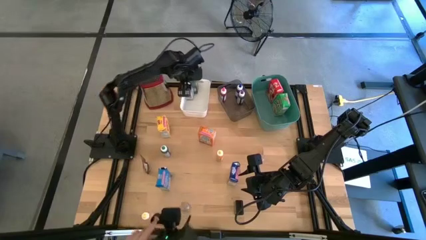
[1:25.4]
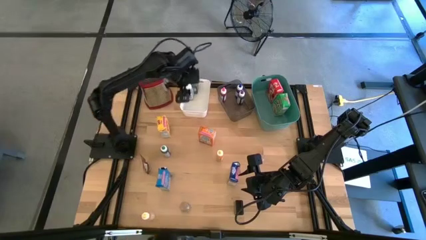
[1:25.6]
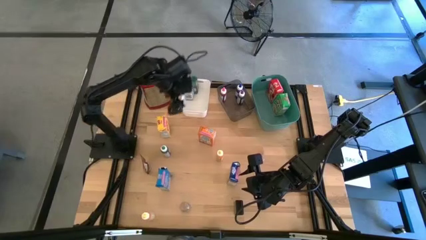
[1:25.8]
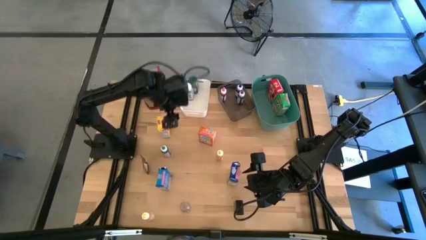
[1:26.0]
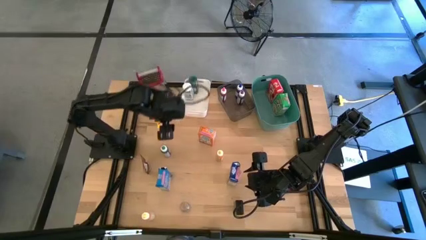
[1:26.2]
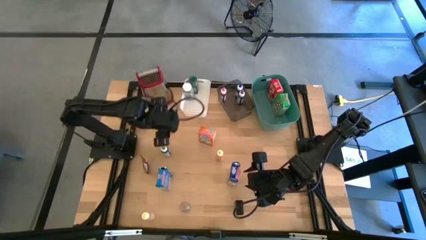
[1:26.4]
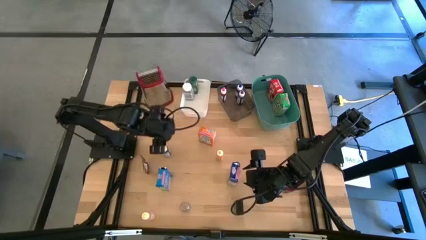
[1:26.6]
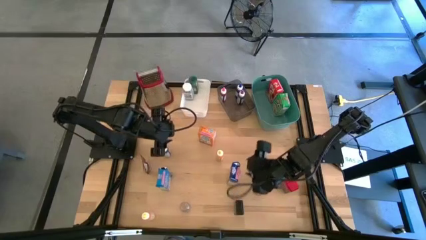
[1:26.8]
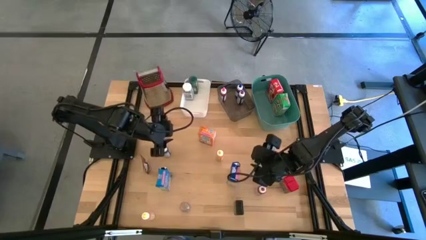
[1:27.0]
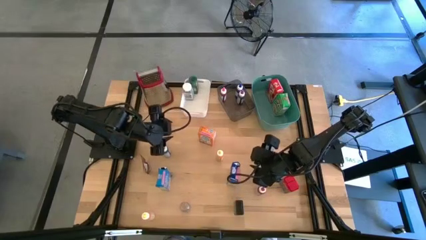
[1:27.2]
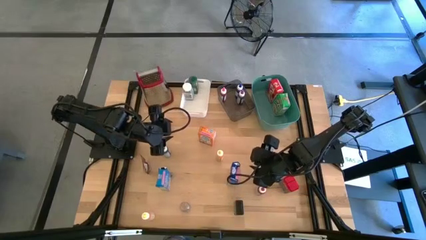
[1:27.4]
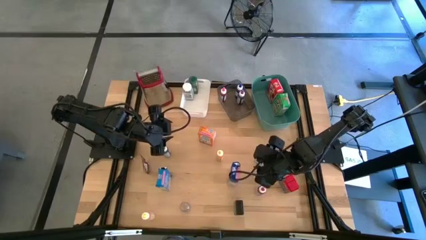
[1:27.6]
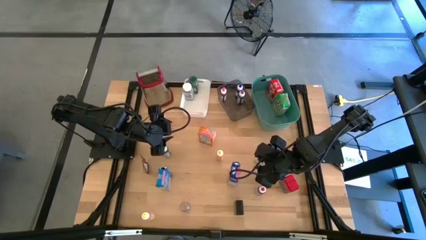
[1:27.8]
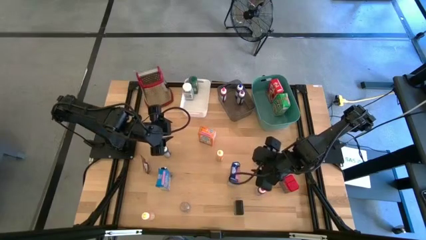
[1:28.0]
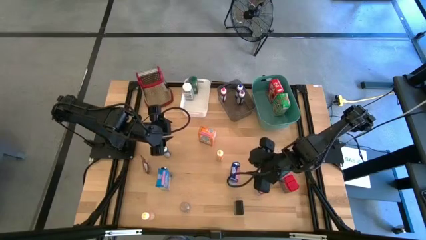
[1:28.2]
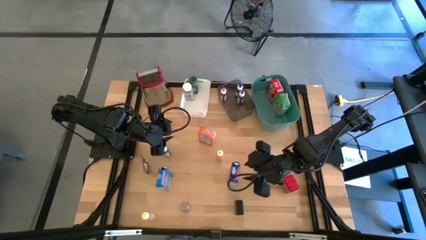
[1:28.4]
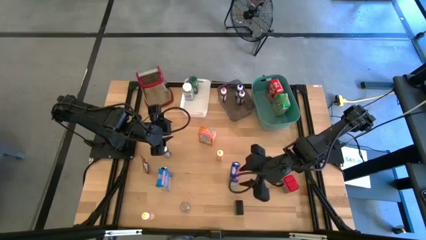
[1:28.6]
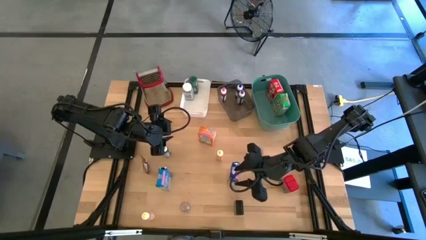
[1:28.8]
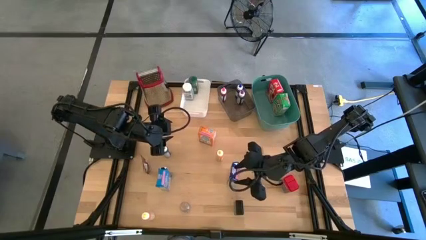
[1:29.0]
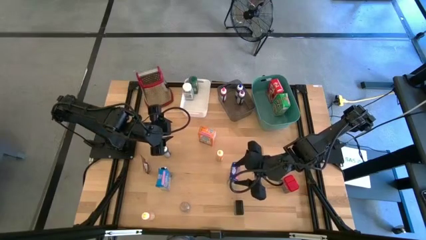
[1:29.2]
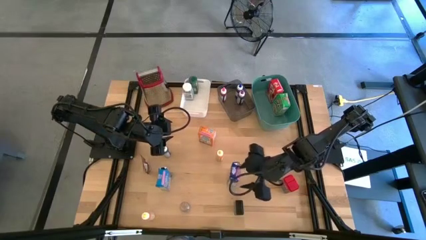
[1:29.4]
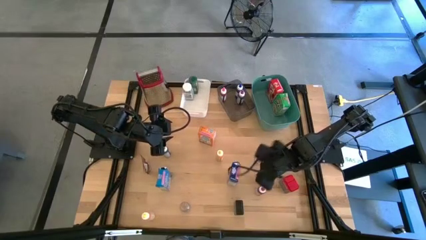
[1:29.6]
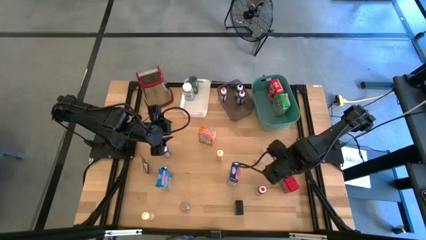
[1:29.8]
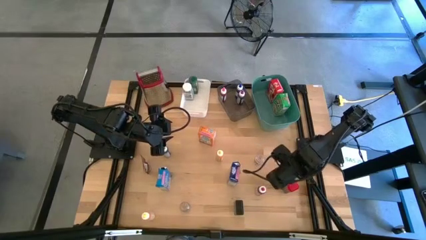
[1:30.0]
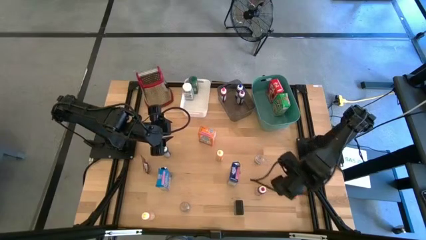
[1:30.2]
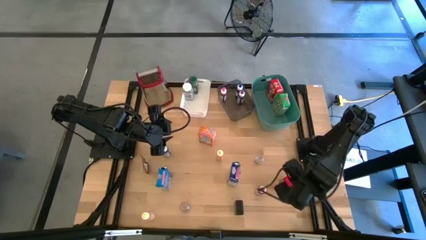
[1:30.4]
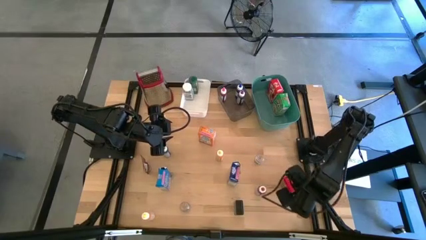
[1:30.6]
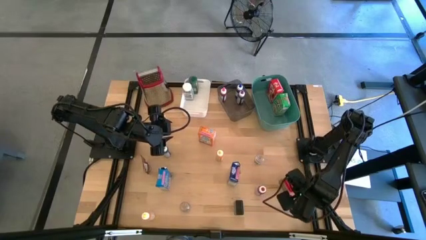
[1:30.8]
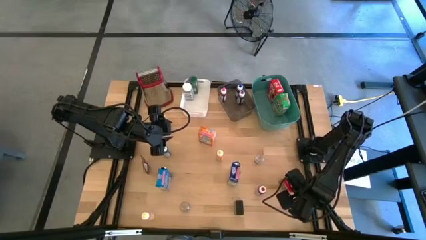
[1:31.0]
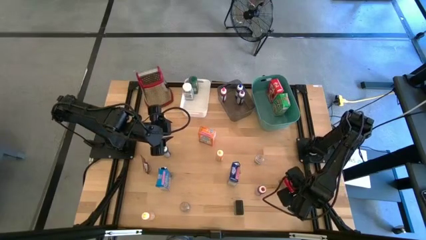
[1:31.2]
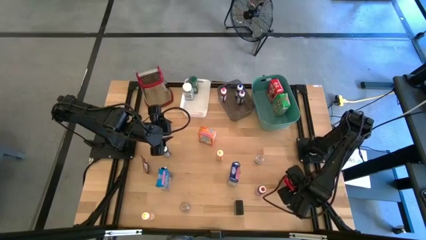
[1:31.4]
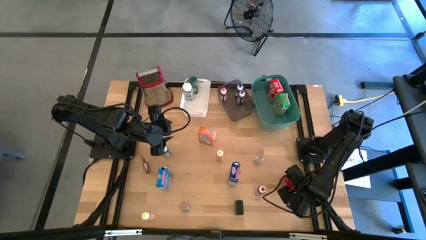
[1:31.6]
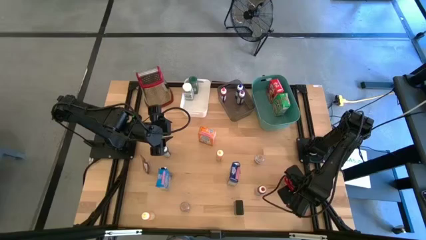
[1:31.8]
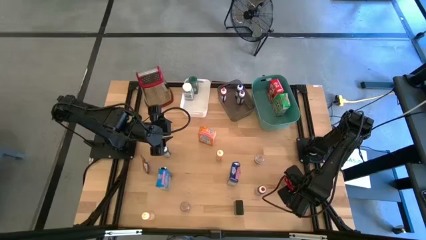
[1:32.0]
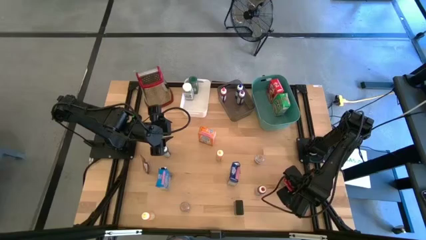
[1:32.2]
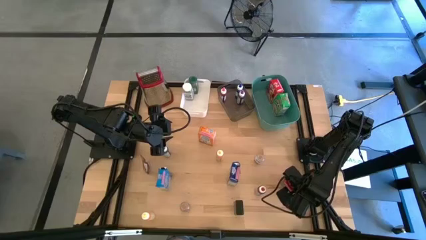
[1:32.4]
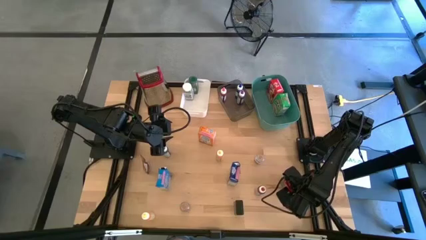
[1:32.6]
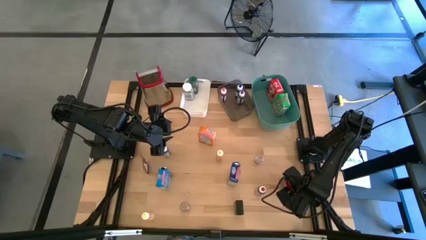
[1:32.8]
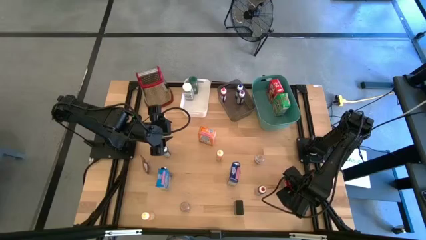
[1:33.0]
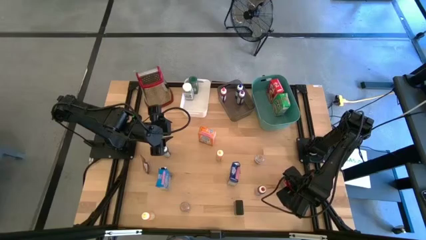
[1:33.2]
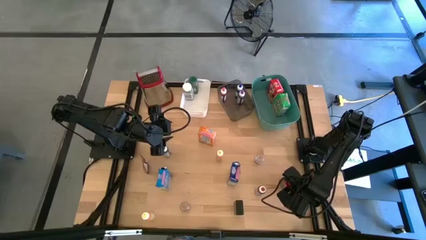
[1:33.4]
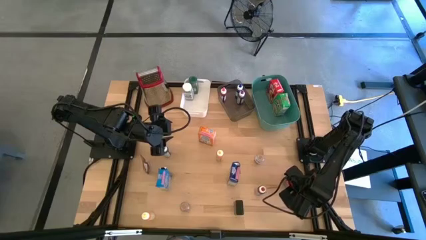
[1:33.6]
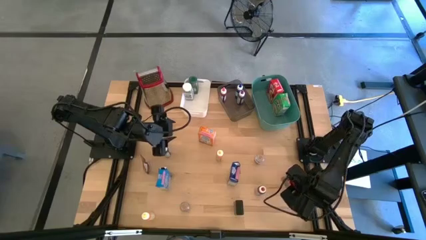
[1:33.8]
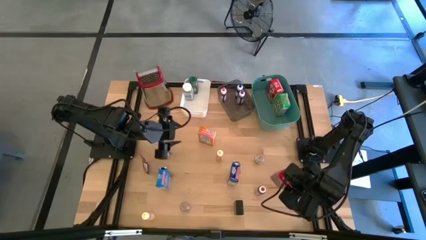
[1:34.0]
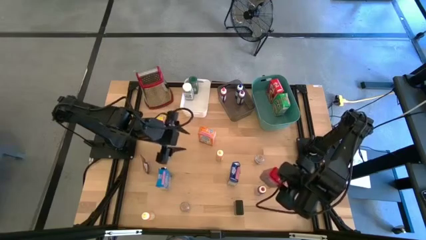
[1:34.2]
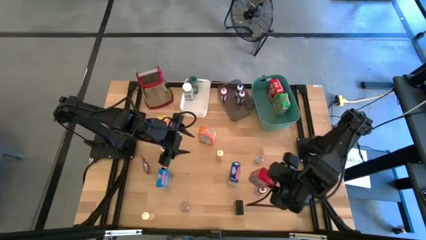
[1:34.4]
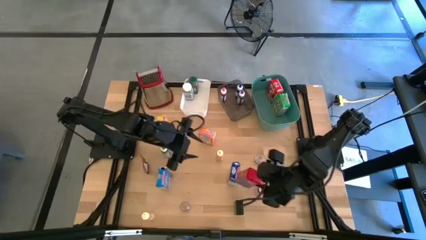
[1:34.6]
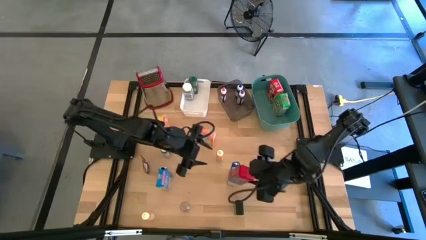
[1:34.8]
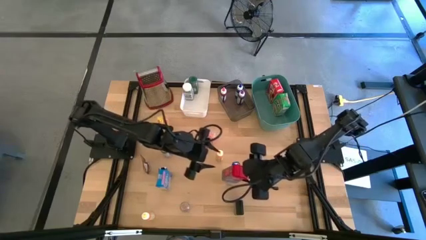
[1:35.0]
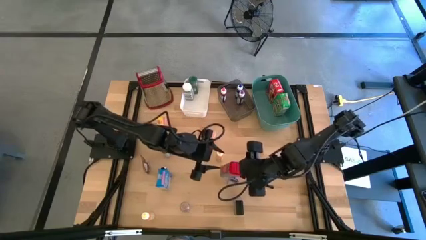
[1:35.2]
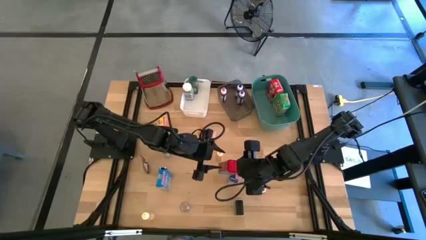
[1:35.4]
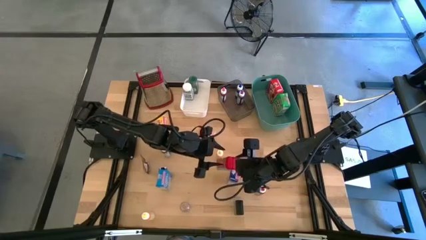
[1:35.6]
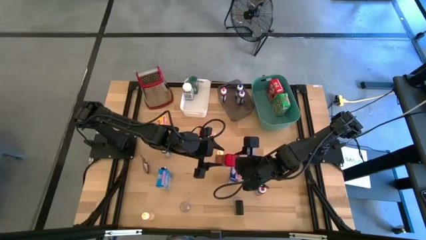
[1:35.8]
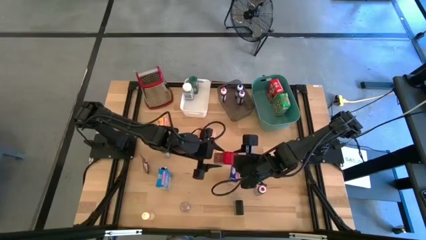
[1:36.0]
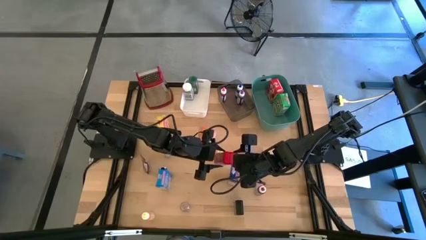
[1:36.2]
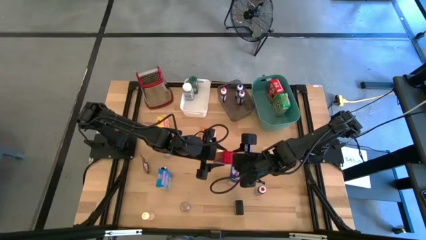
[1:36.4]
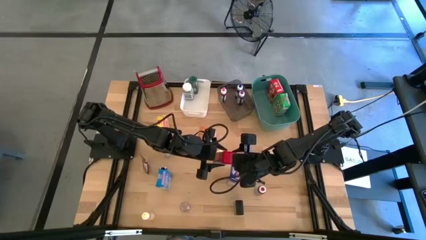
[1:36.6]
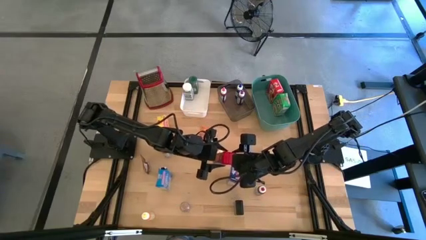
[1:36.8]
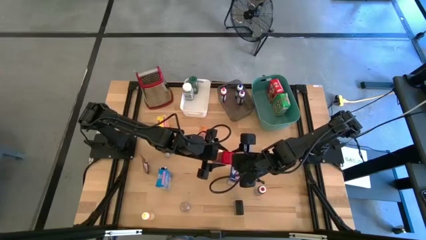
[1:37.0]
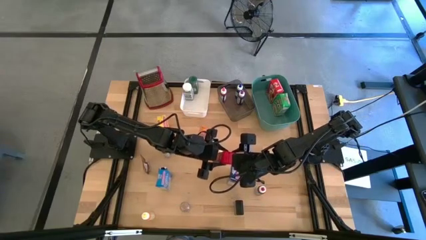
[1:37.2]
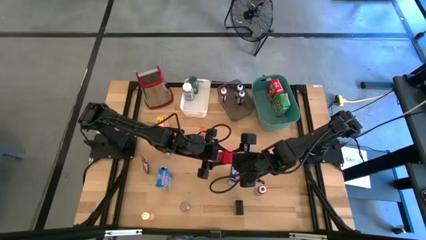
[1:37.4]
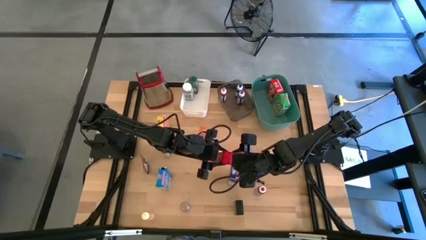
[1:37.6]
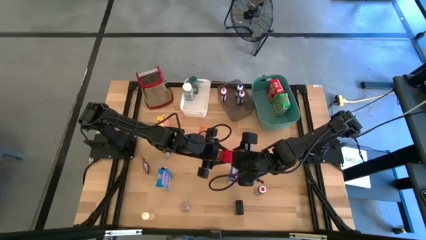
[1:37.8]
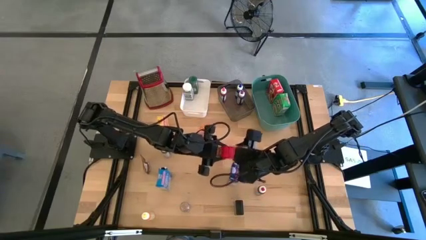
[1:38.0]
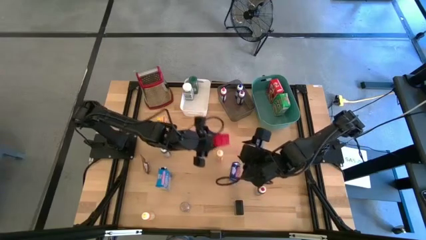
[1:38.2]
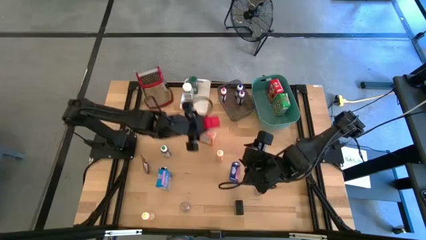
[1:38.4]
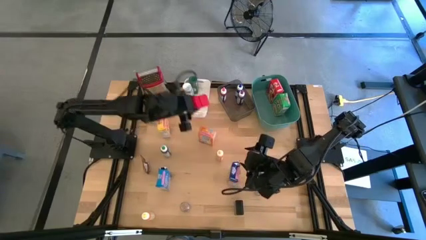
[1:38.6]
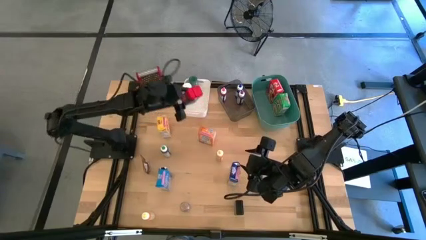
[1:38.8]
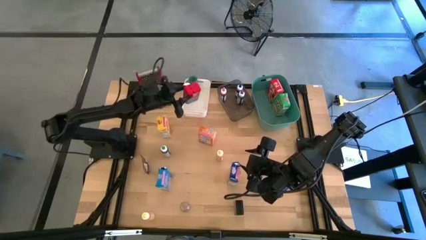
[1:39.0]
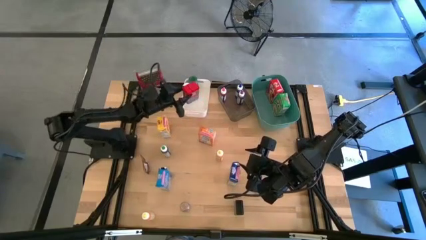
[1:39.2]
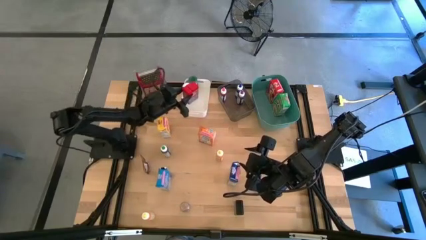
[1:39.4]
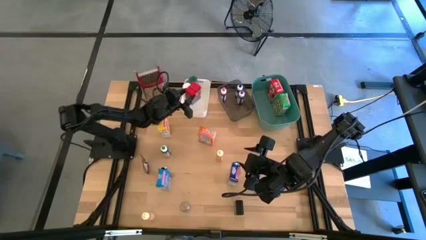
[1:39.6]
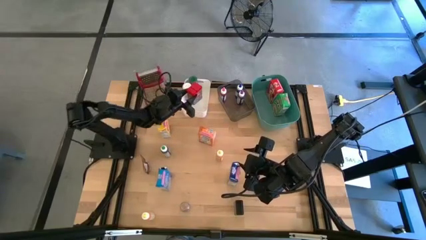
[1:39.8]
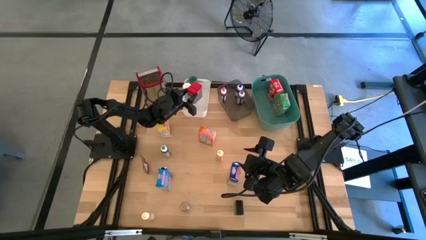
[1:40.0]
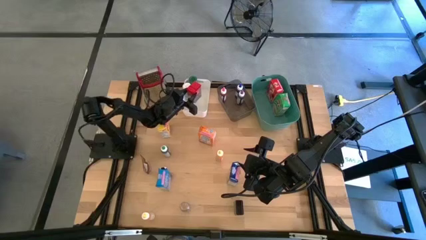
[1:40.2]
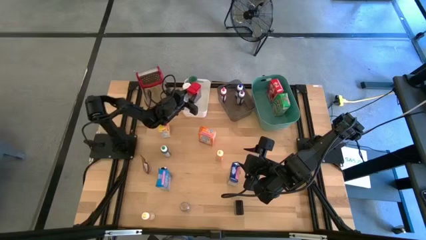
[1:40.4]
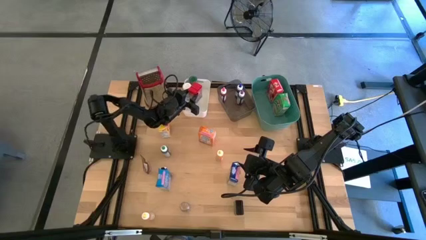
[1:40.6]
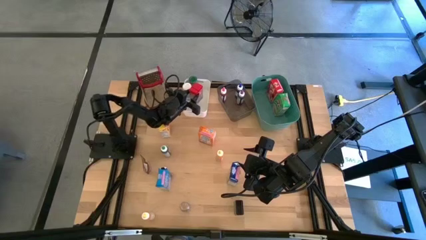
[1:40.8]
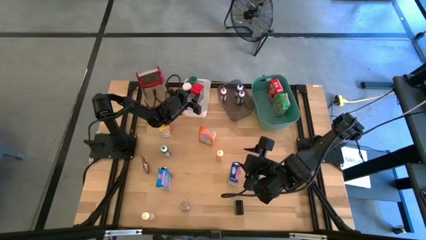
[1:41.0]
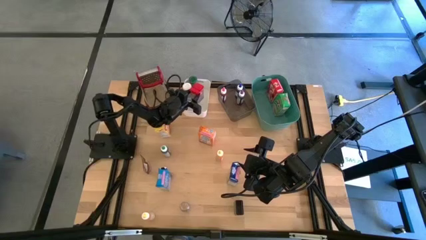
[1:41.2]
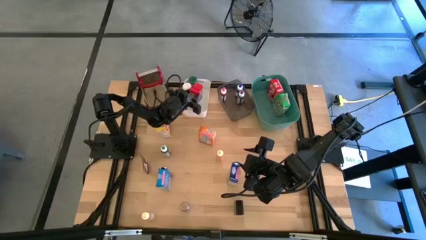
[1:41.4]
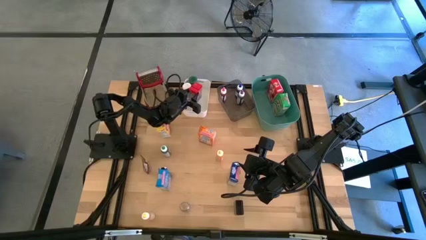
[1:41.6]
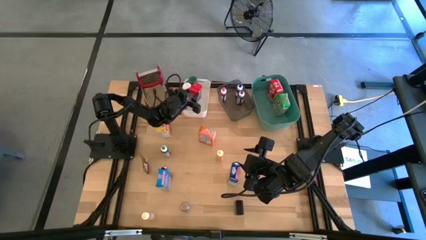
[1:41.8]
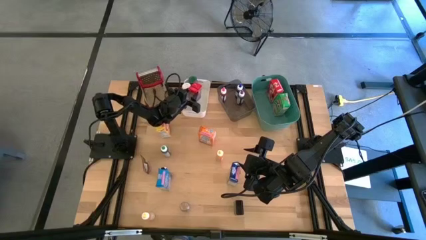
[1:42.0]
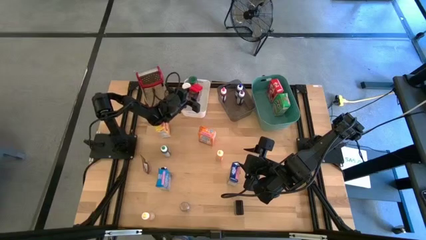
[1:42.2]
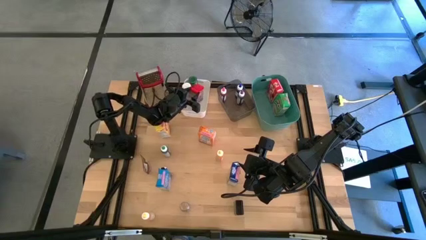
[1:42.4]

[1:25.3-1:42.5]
Task: Pick & Place Kitchen Items
Put the red seasoning can into the white bin
